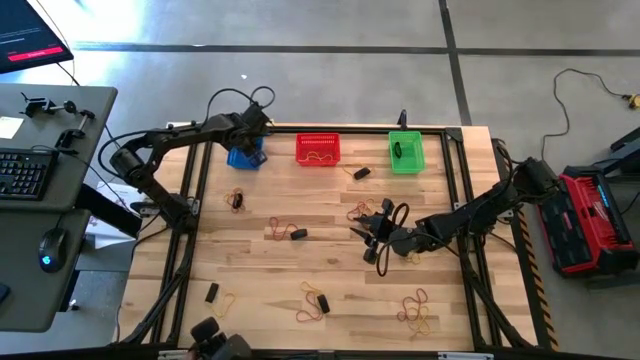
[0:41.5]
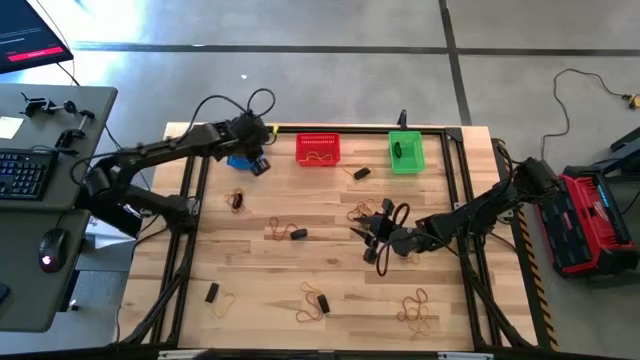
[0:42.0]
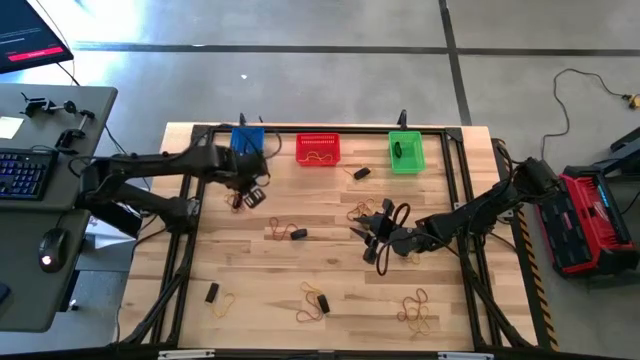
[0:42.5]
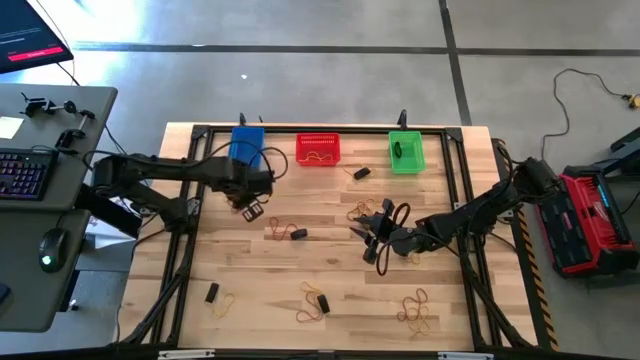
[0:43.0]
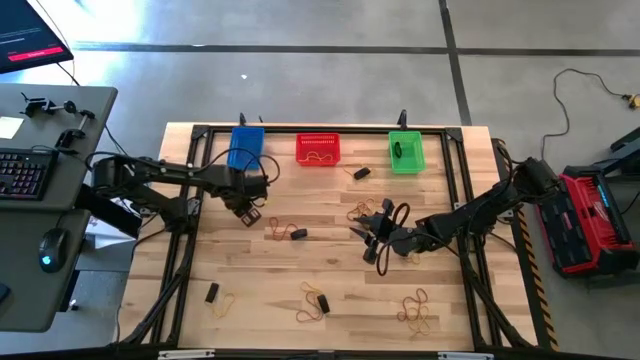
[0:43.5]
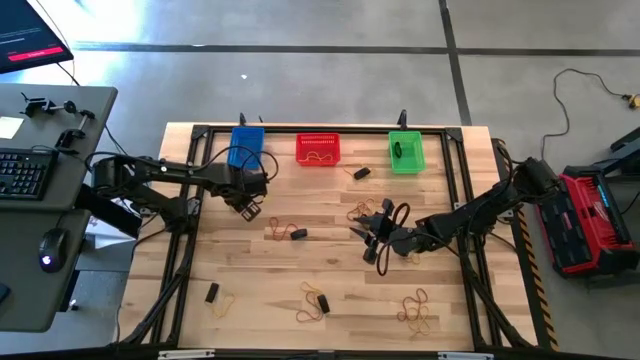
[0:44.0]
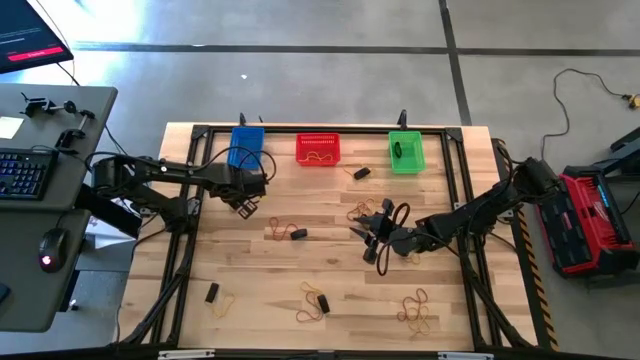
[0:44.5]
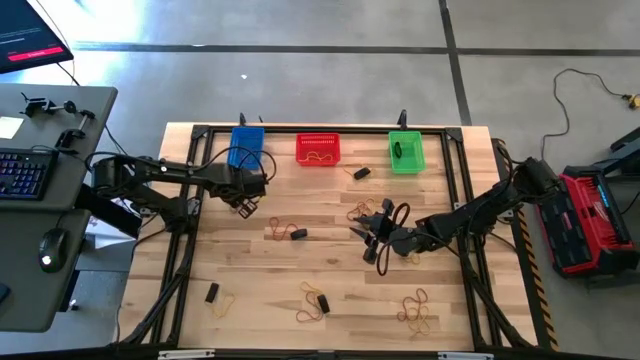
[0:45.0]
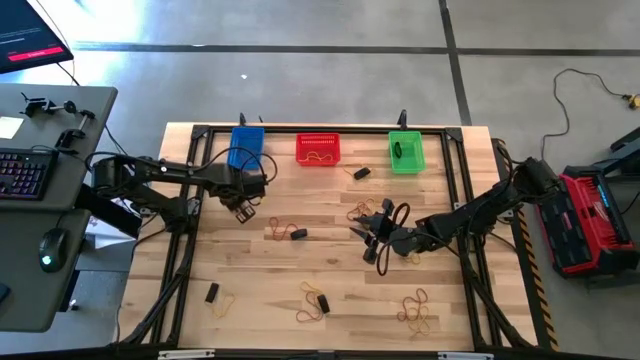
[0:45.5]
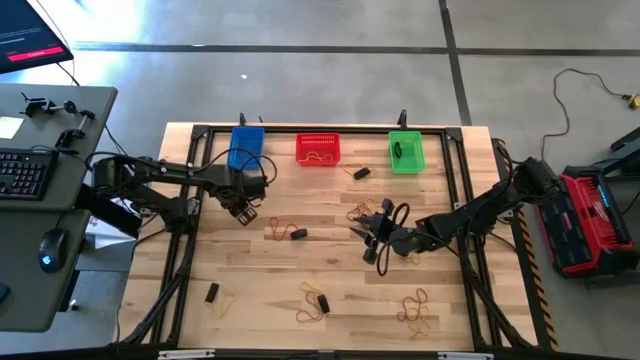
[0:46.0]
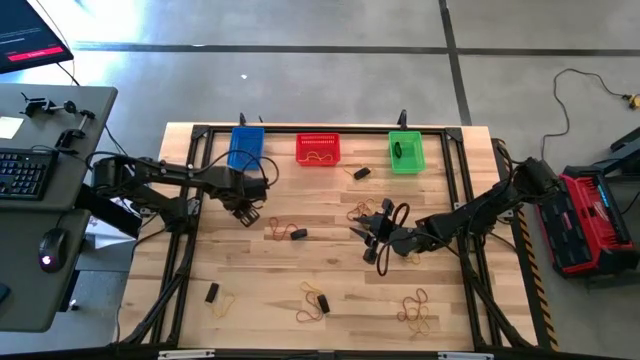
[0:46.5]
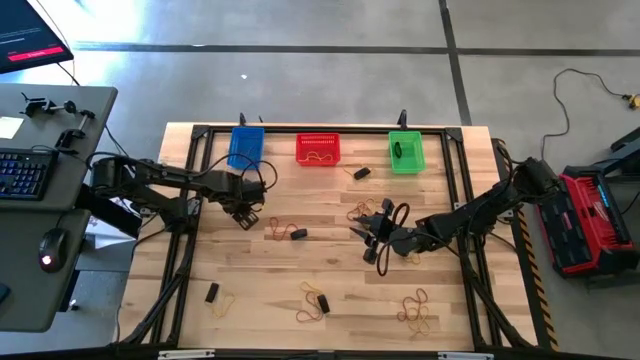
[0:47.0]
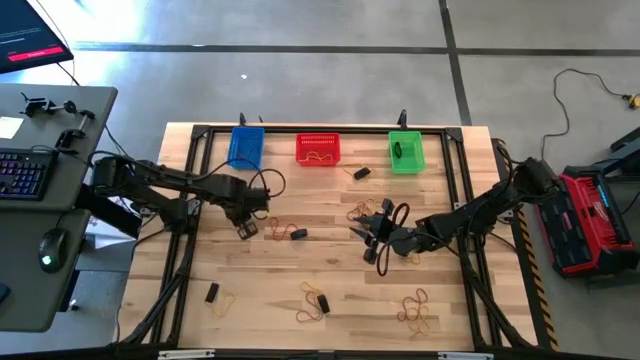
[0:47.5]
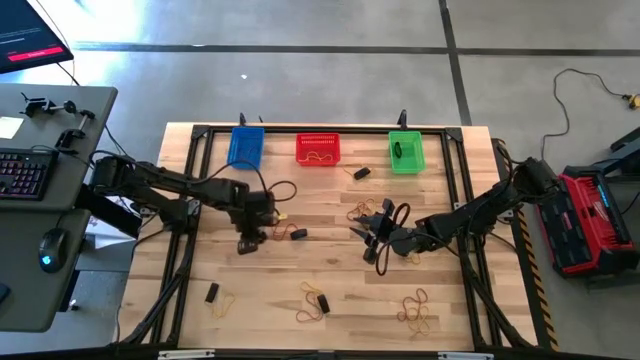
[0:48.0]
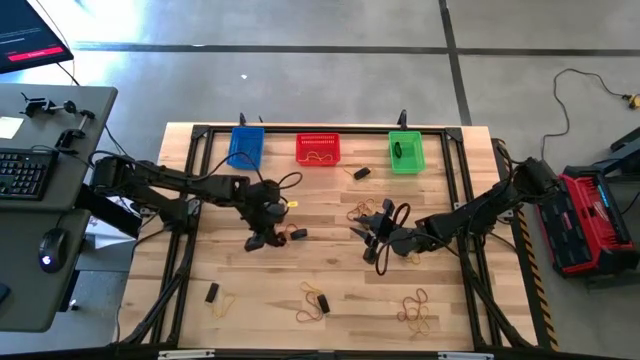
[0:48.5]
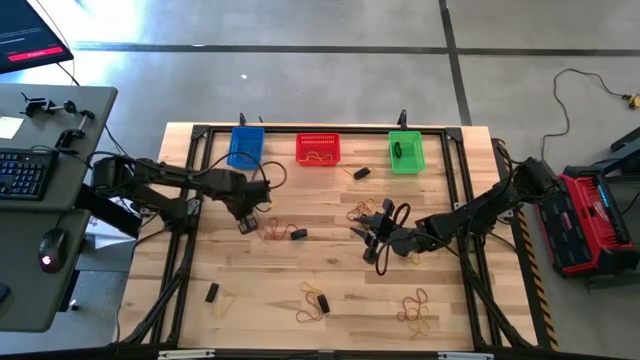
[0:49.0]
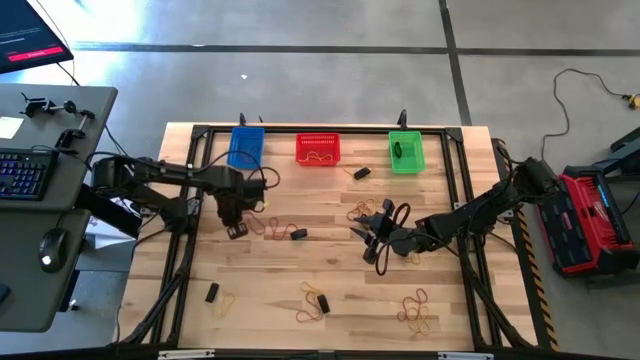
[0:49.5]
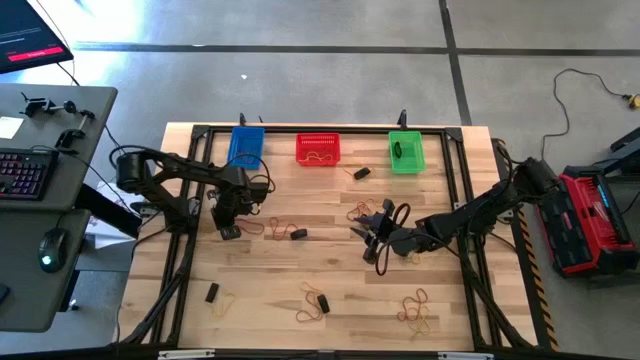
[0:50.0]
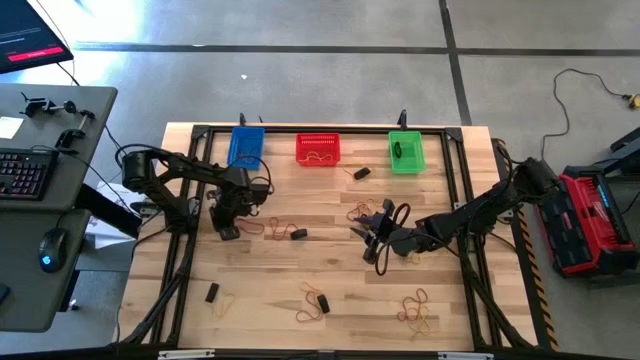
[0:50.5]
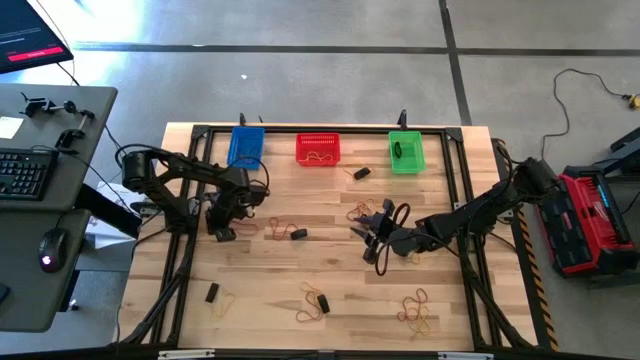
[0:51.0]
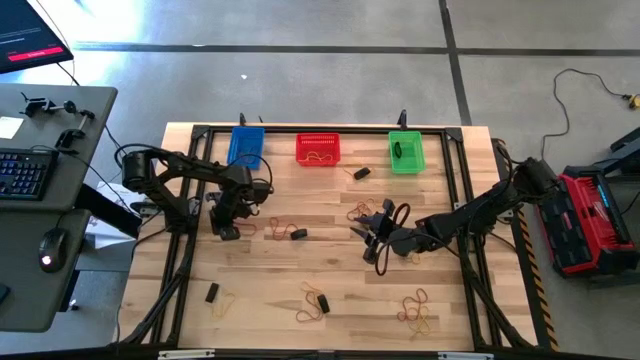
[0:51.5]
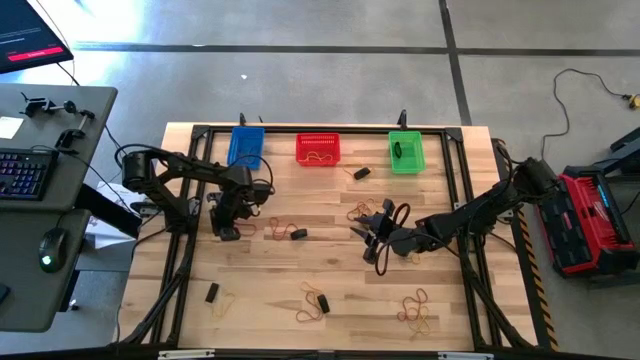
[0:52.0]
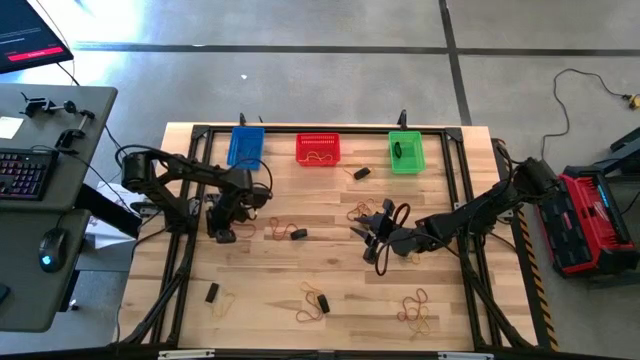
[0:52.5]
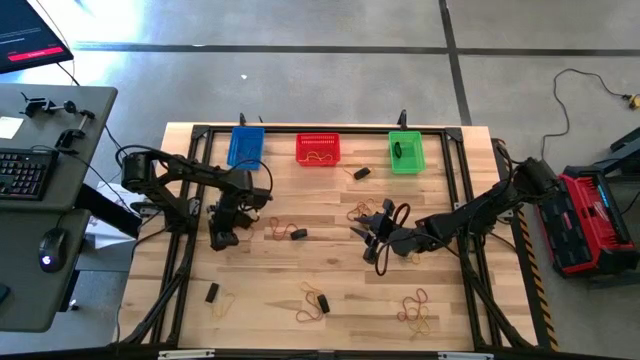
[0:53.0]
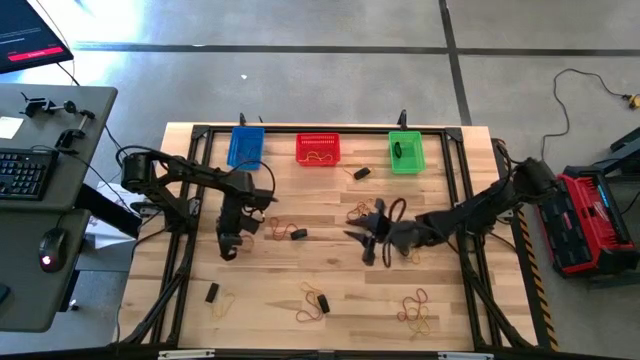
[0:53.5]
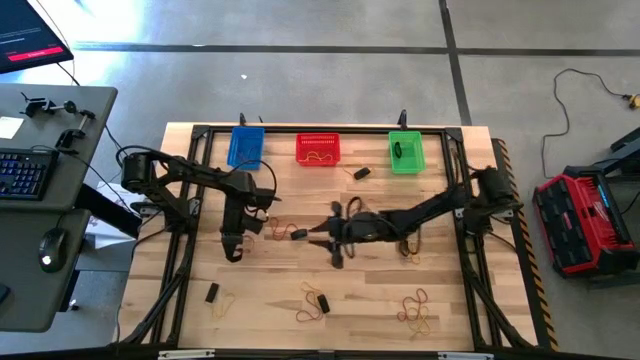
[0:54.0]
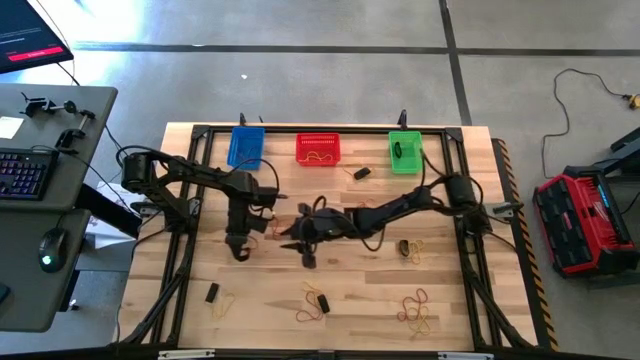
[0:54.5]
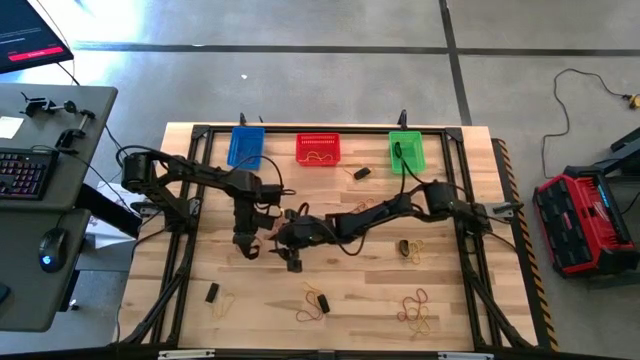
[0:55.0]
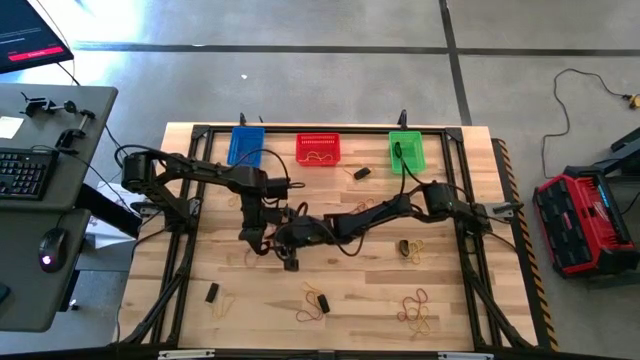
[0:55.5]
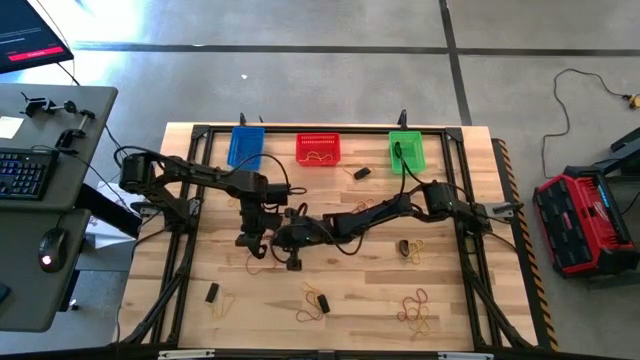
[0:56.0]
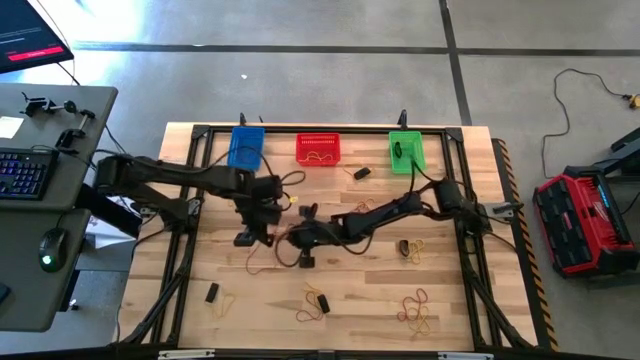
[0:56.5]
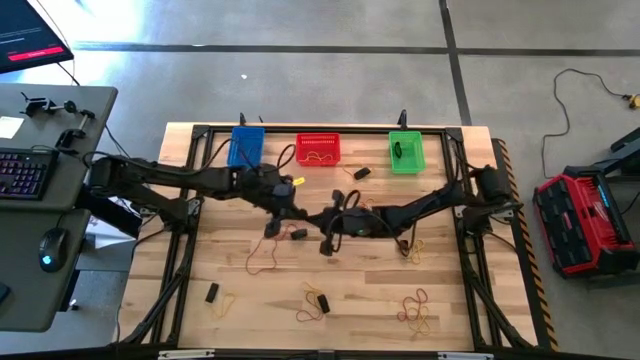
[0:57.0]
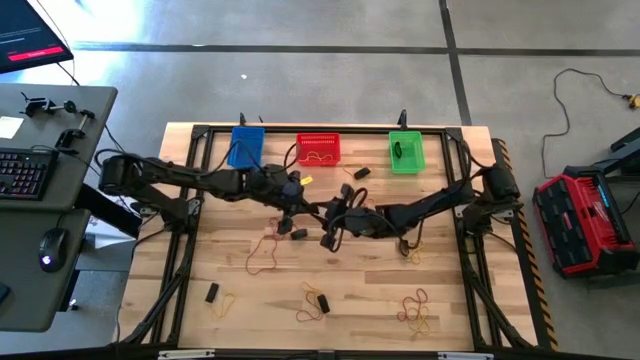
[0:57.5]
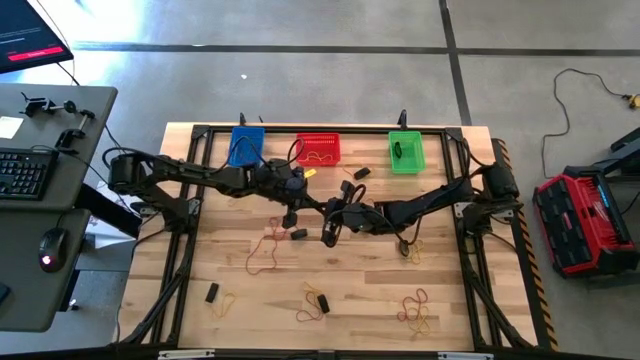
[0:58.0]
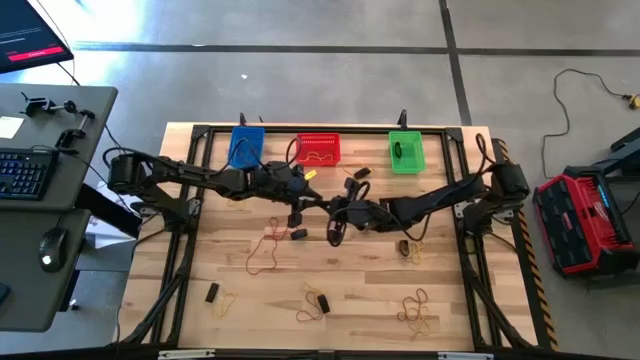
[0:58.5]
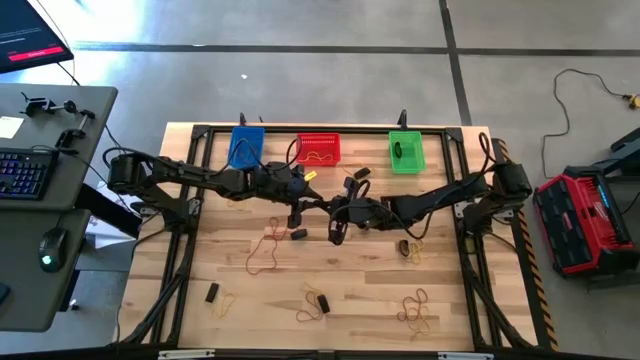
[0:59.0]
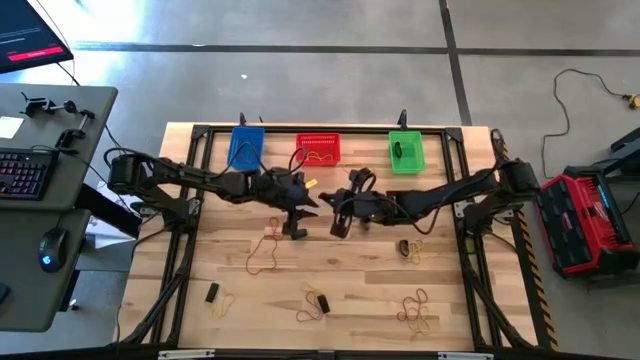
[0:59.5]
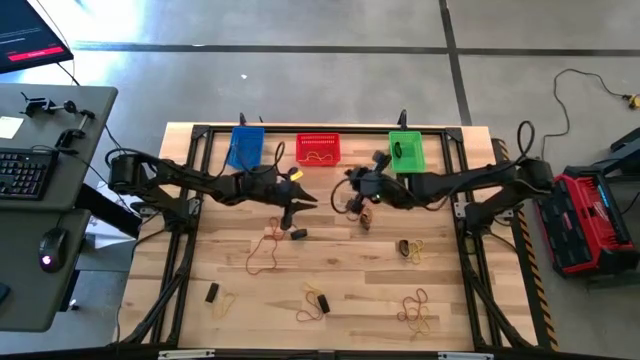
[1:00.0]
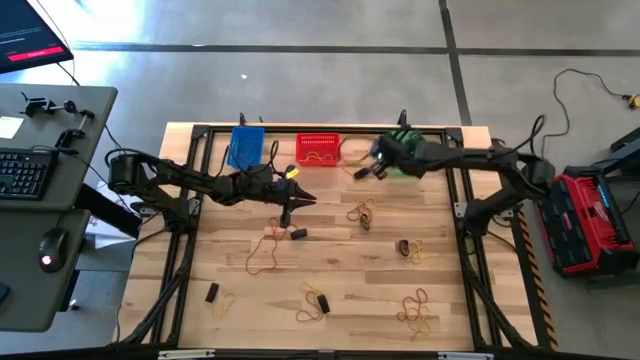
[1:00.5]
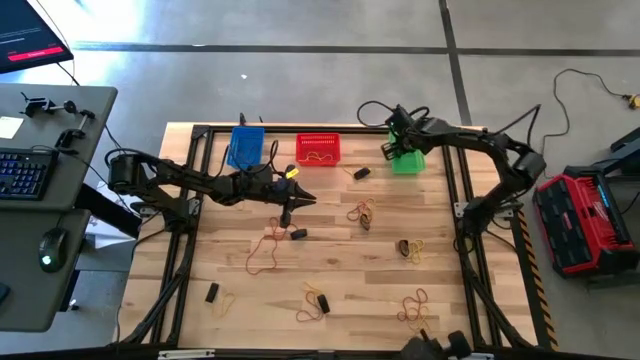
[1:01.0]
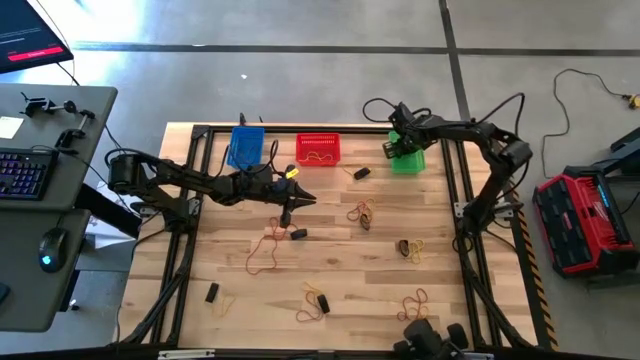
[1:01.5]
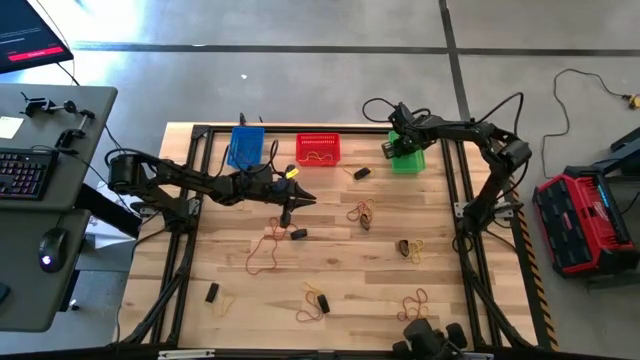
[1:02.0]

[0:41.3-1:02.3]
Task: Sort rubber bands into baskets
Put the black rubberband into the green bin
